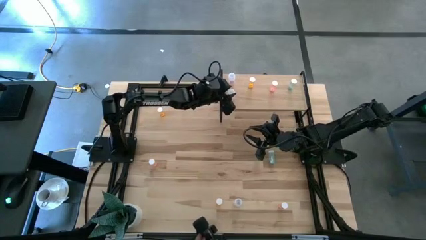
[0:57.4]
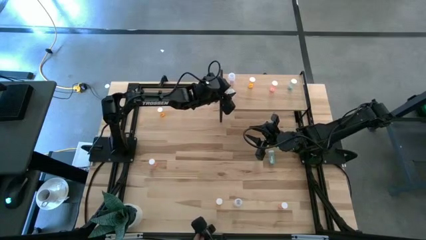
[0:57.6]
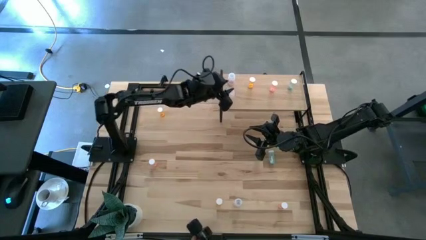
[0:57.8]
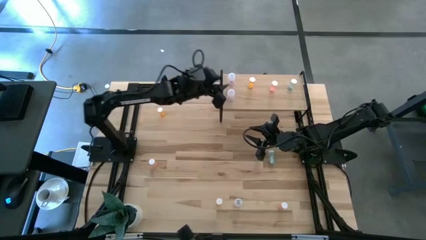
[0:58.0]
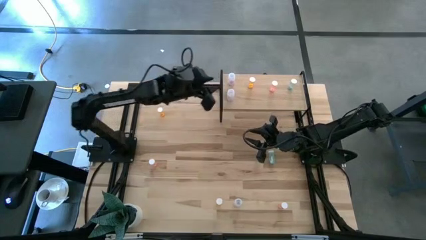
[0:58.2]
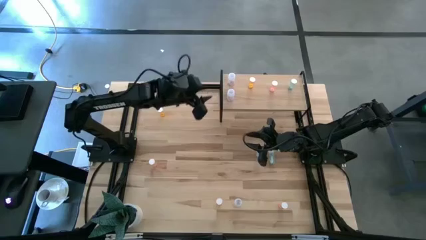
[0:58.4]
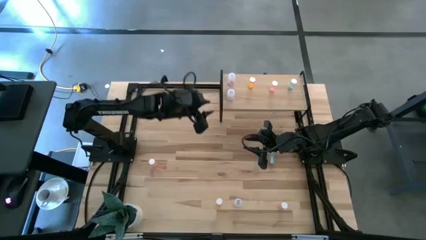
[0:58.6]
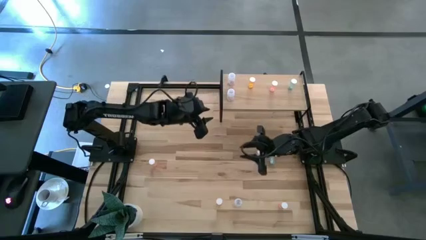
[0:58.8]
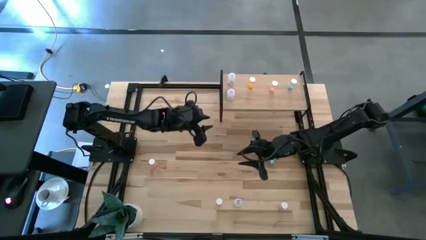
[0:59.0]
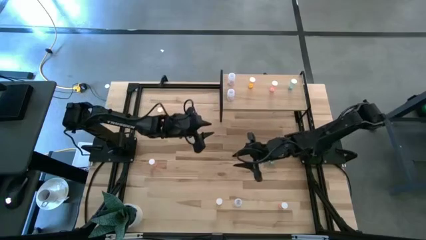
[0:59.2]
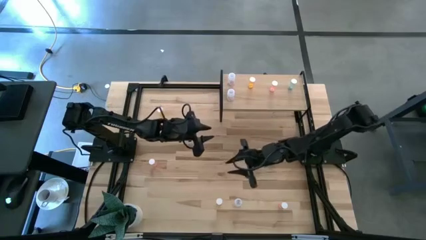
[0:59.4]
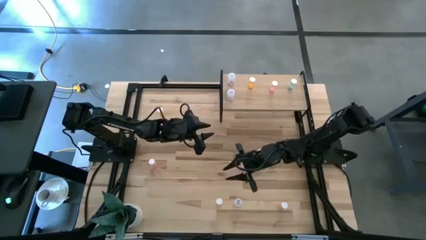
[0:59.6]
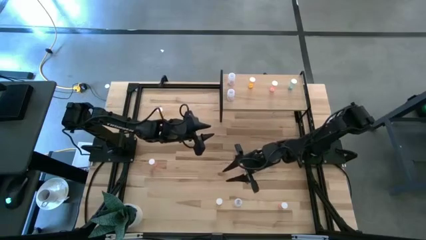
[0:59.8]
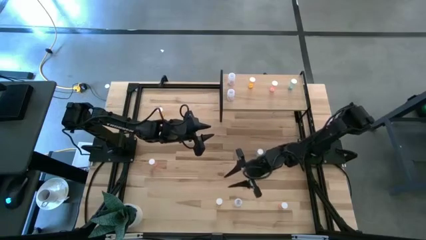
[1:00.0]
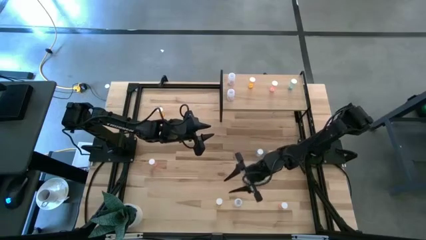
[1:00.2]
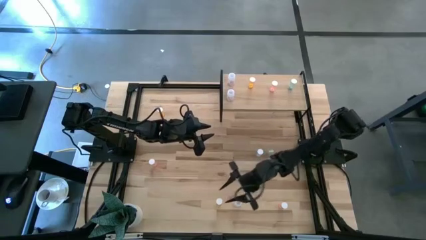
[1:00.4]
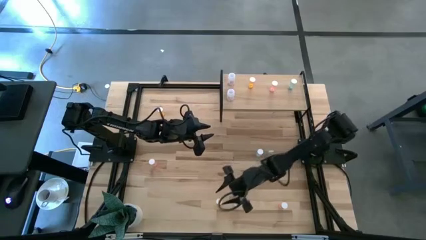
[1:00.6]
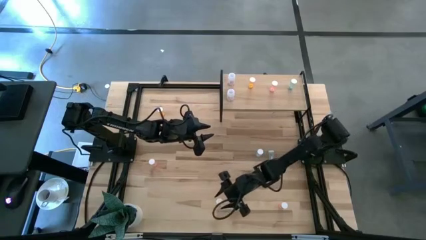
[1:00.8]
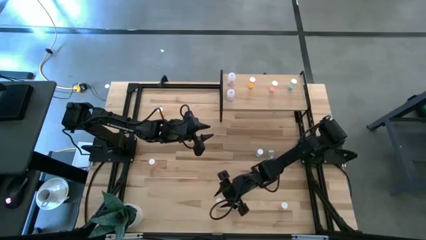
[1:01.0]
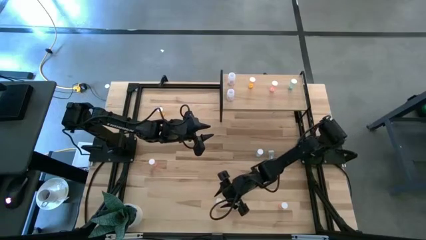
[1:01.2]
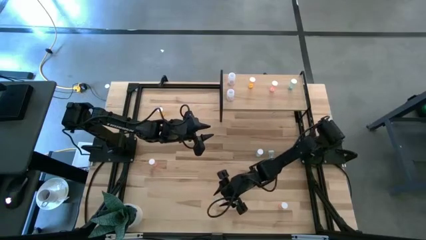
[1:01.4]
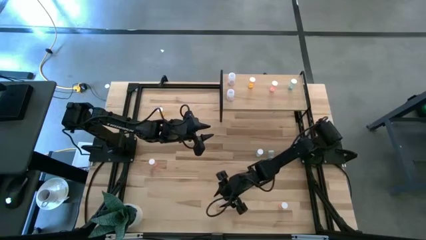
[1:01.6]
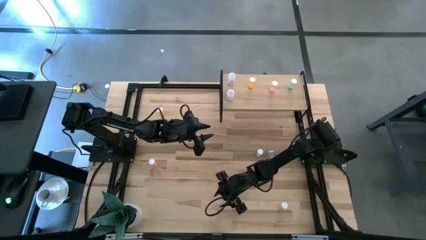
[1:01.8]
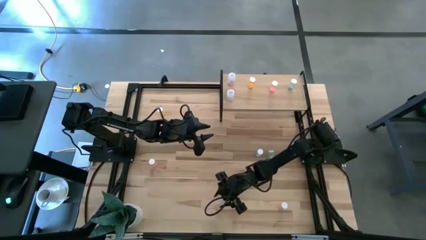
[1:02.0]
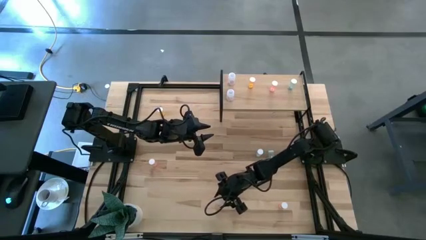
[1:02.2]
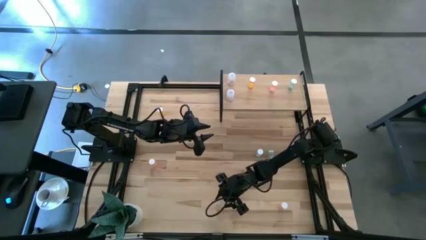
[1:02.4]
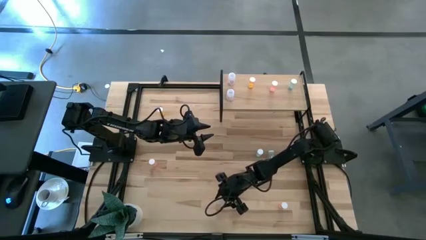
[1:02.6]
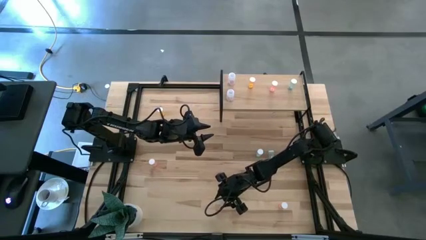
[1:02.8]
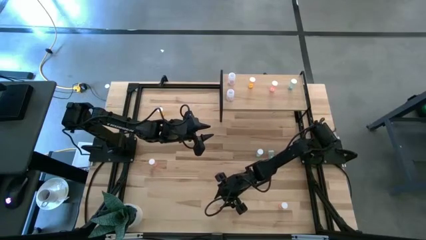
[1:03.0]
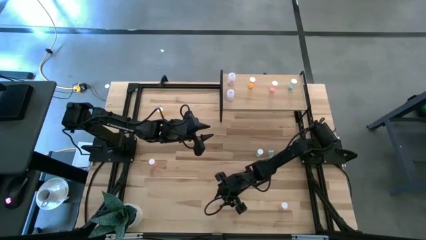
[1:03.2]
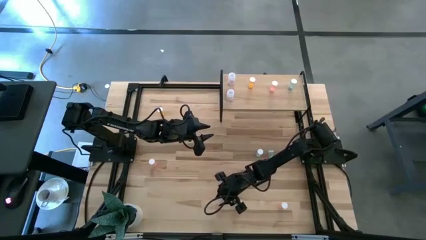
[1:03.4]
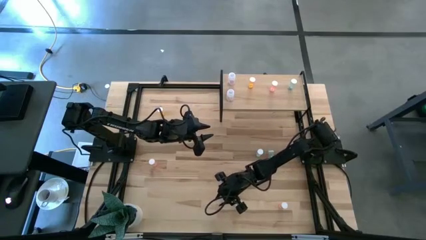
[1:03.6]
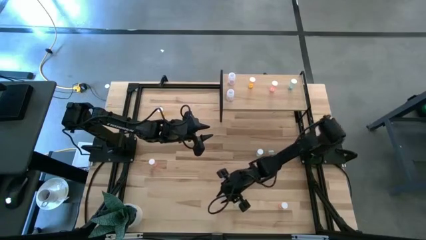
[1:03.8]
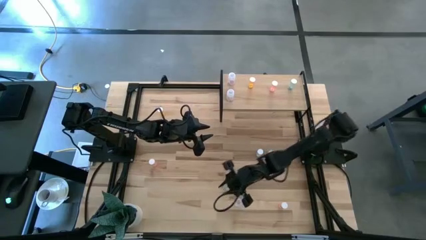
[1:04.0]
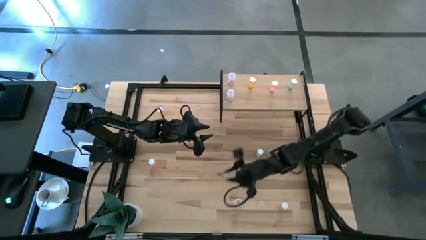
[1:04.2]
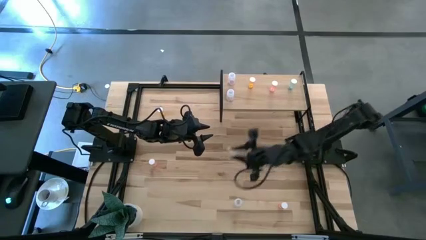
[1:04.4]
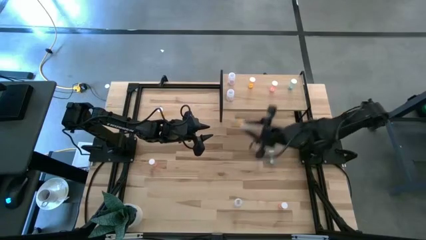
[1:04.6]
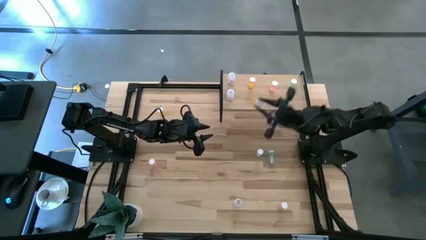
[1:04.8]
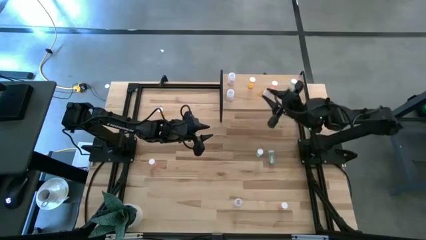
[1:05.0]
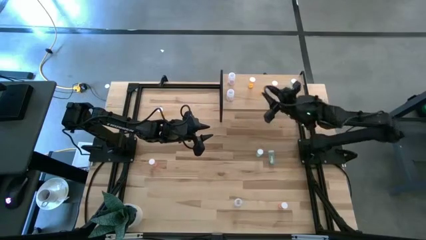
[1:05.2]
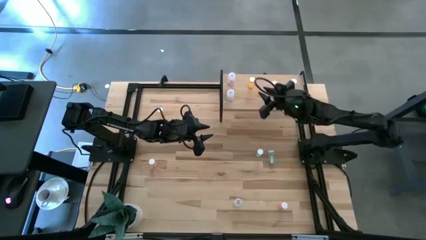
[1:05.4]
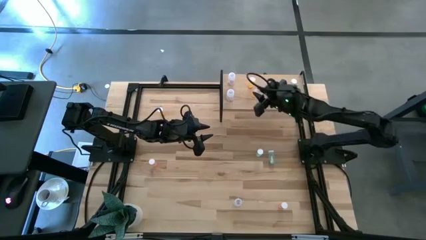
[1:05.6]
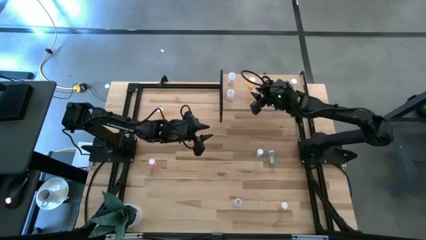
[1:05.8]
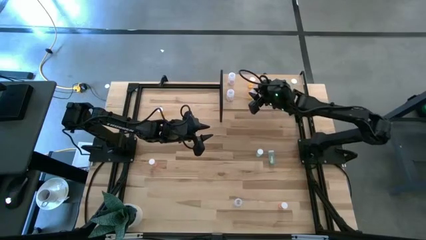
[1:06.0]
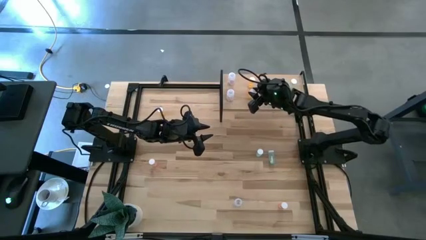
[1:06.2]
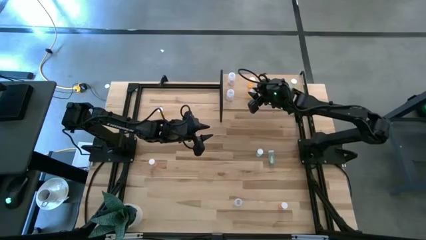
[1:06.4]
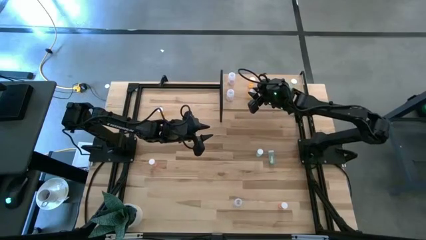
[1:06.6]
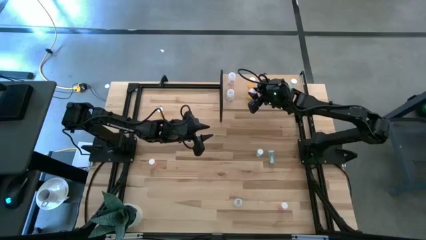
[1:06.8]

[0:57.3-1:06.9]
Task: Pick and place medicine bottles onto shelf by color
Put the bottom orange pill bottle on the shelf aligned with the other orange pill bottle

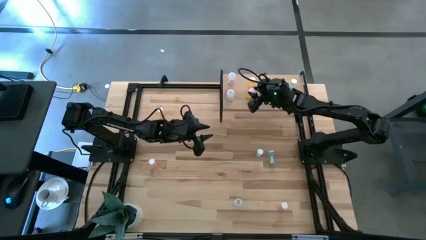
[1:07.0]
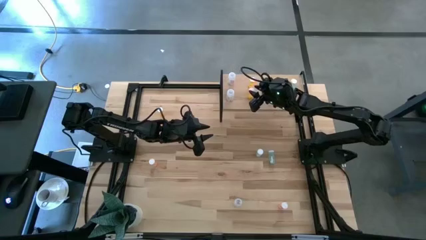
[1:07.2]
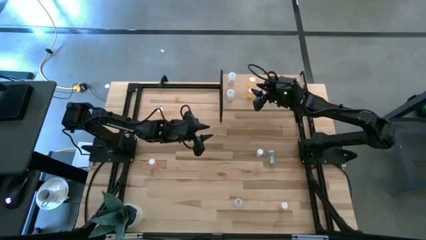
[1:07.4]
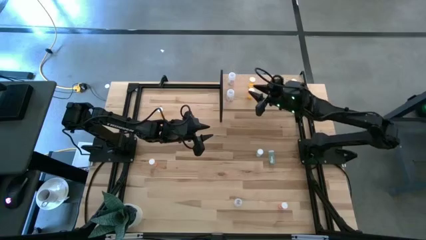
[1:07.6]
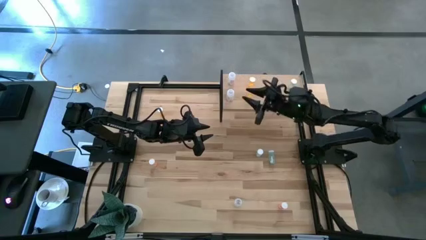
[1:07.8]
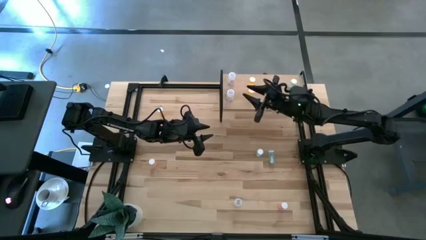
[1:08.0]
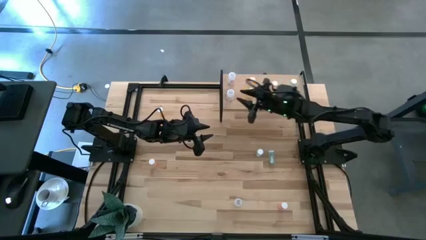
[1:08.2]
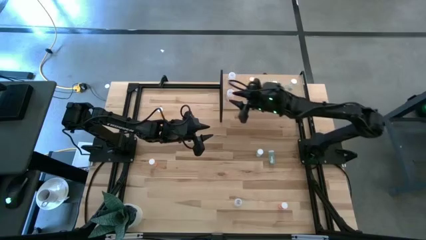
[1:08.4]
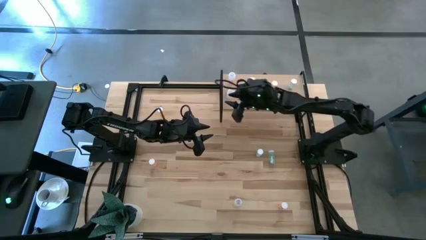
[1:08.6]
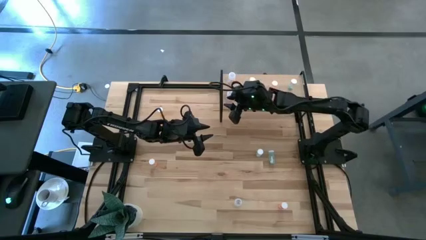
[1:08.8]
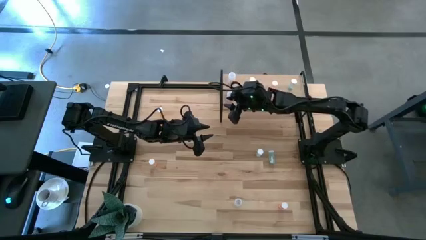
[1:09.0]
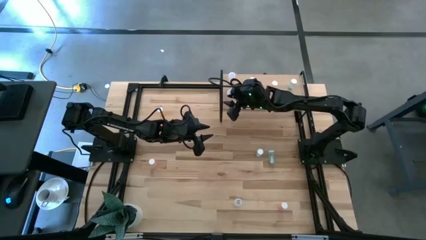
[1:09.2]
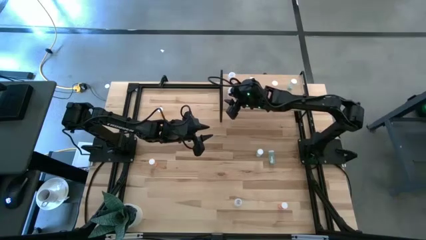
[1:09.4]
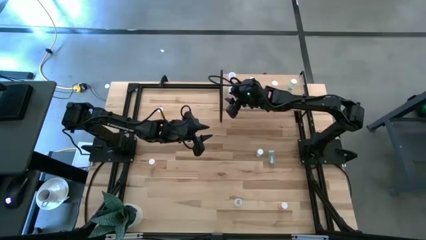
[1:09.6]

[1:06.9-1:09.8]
Adjust the transparent pill bottle on the shelf

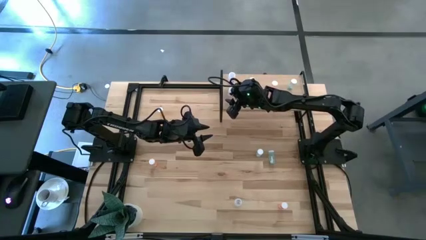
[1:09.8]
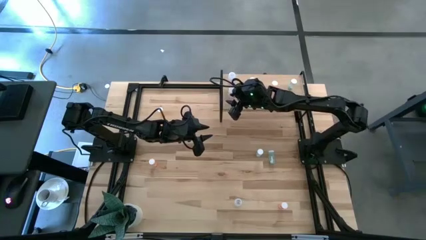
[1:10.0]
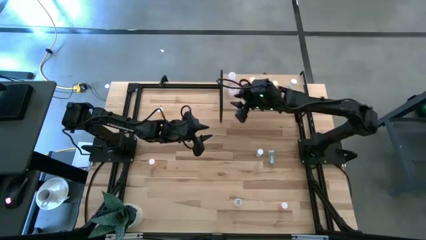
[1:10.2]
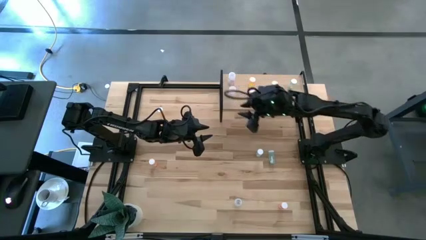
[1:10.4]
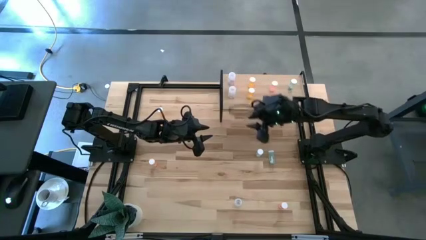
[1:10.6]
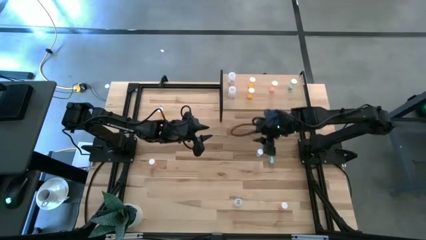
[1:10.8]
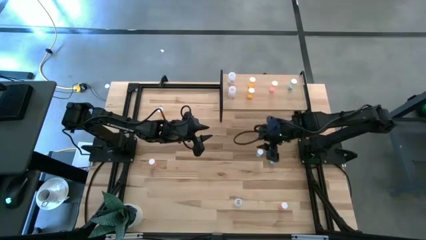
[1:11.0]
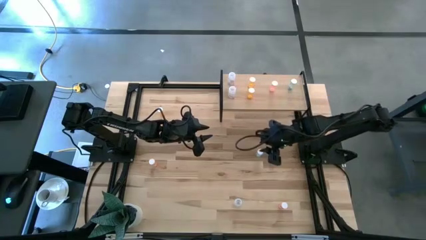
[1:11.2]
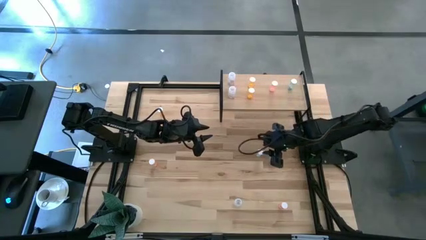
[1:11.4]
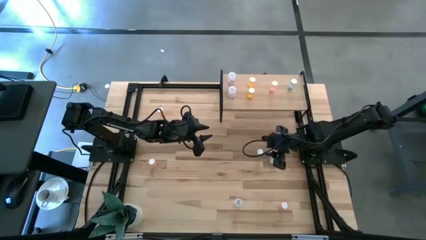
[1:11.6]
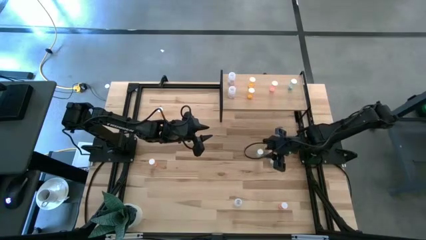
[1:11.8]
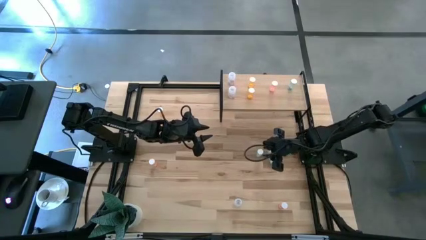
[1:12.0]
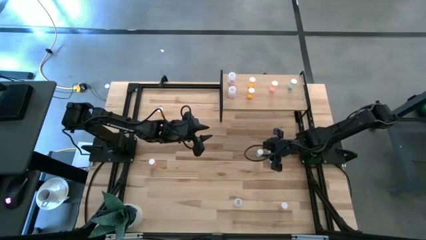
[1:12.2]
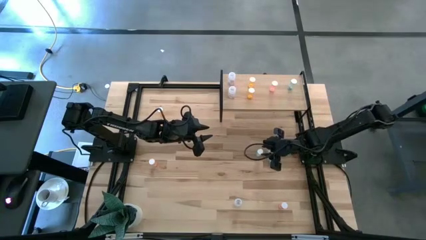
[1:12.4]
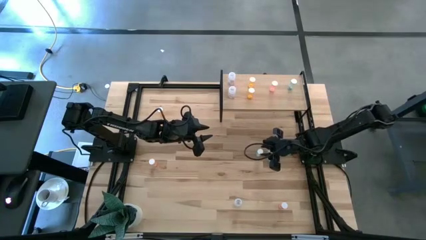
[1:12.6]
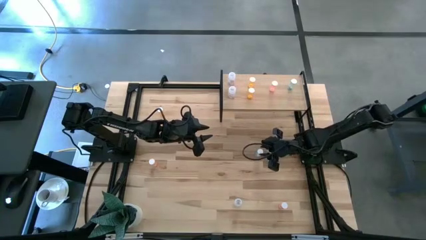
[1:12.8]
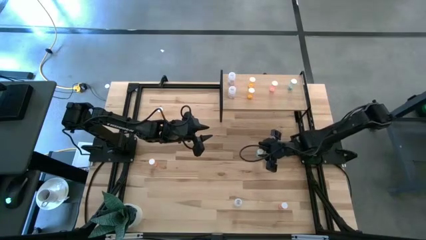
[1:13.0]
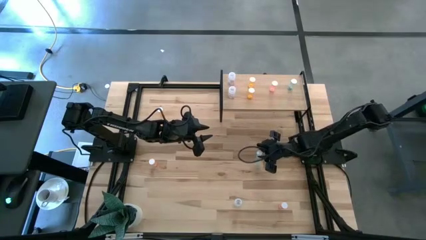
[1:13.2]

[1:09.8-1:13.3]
Put the left blue pill bottle on the shelf aligned with the other blue pill bottle
